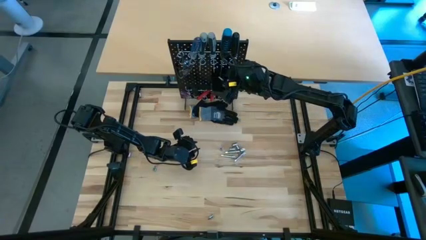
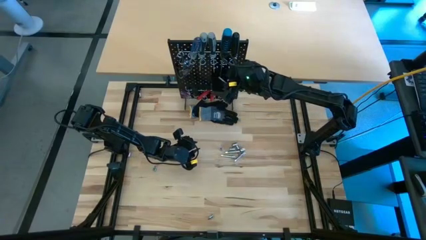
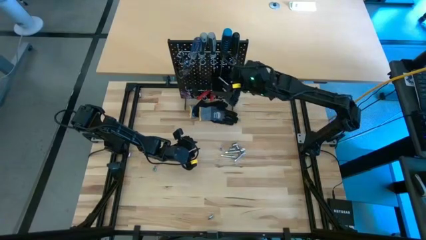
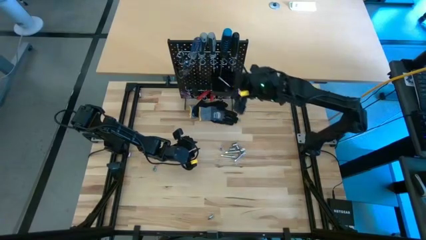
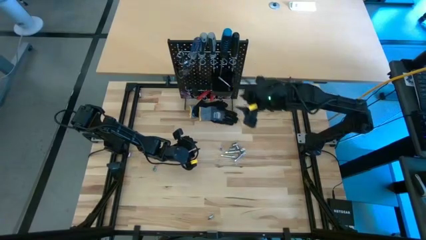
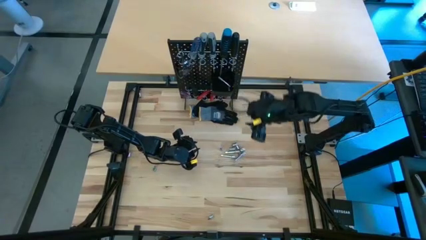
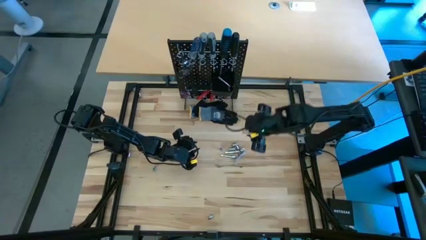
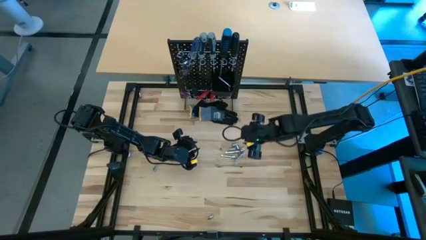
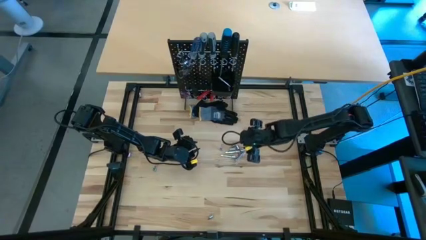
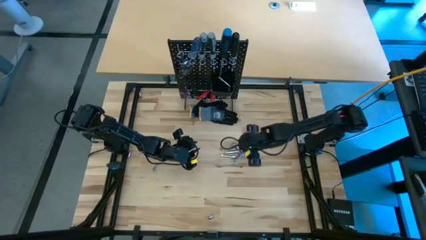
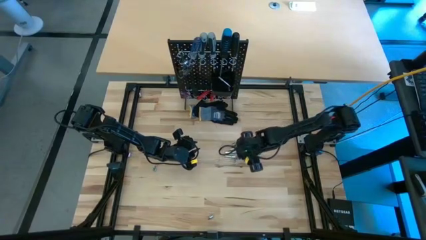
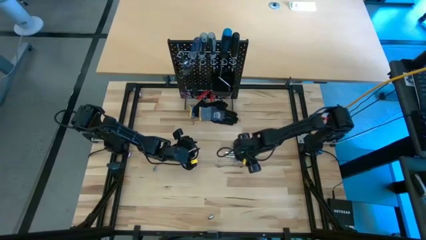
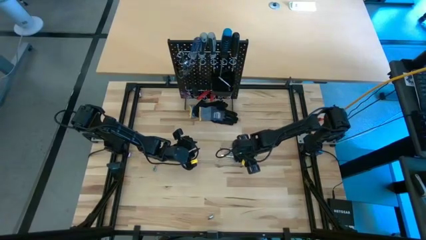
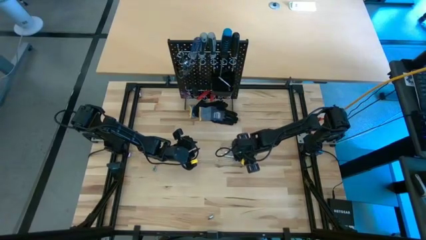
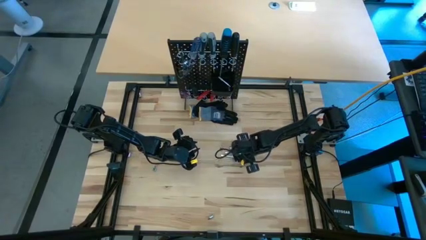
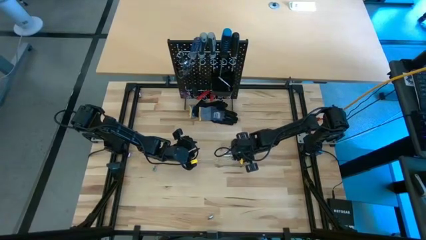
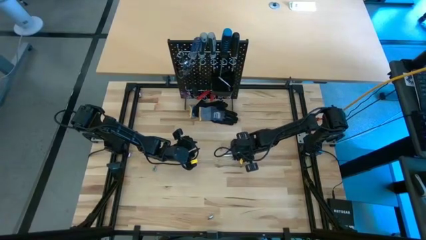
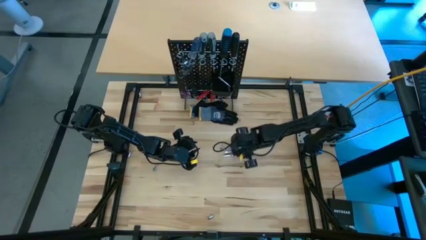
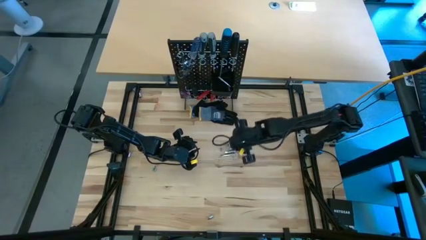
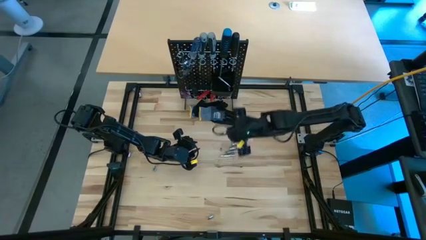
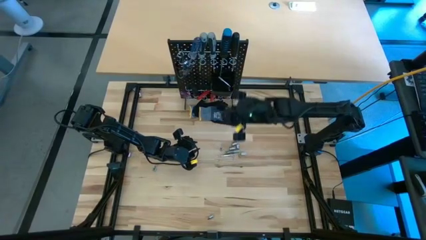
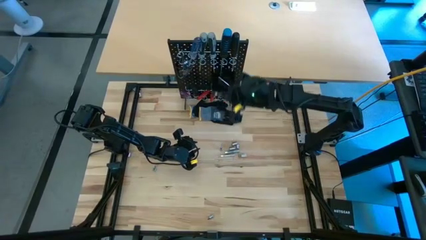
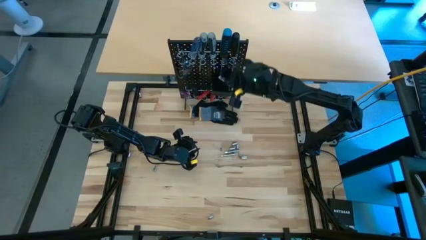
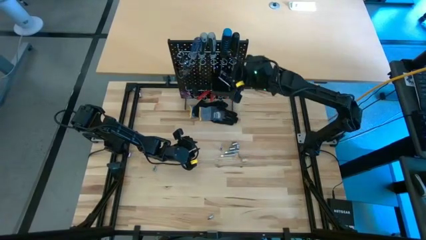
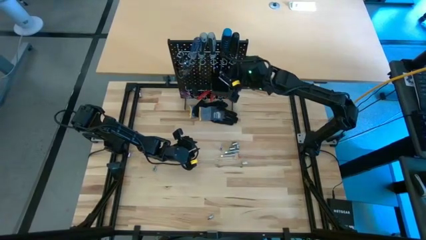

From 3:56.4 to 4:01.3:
Task: Hang tools onto peg board
Put the extension bar into the pegboard bin

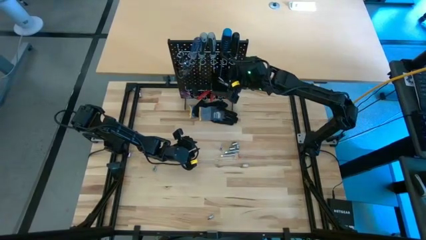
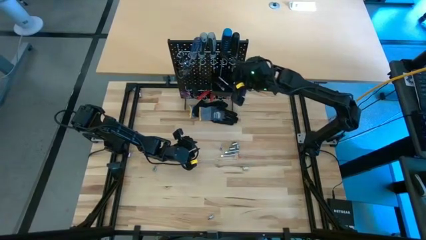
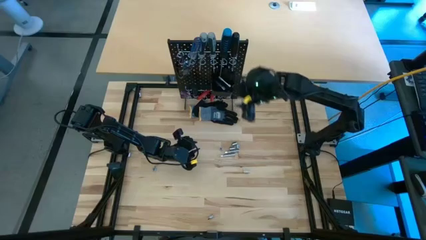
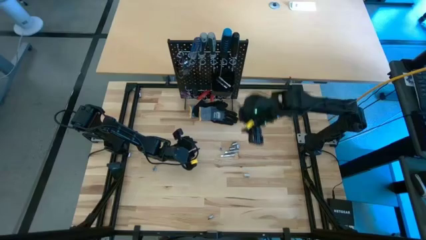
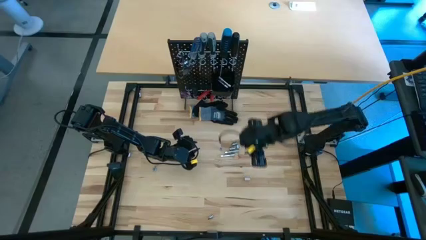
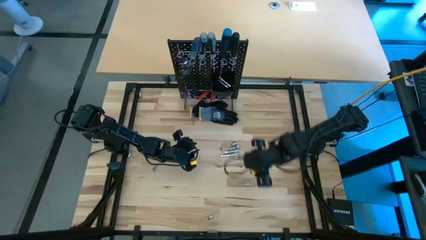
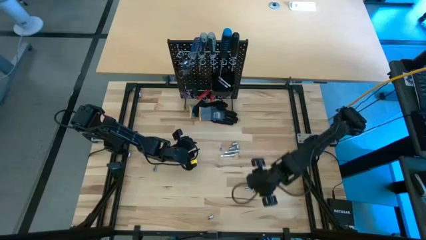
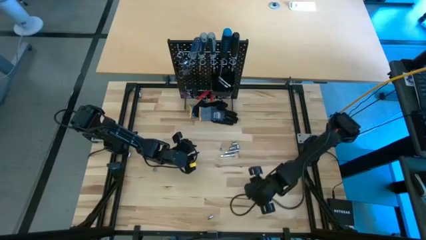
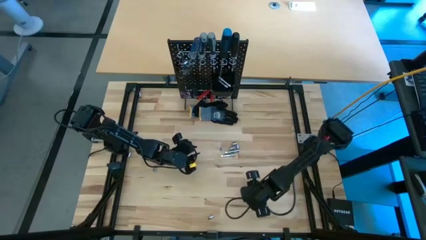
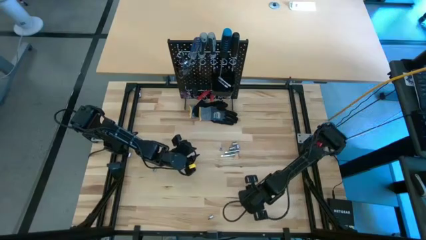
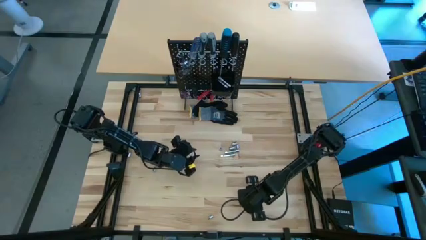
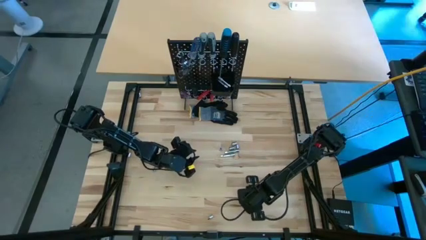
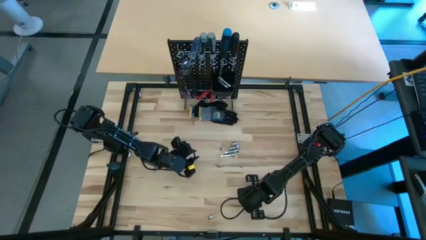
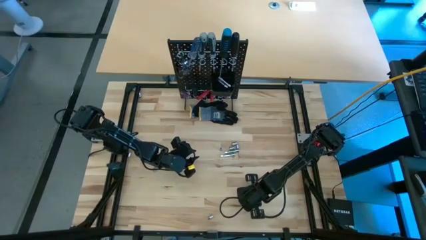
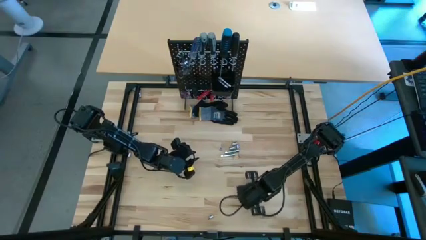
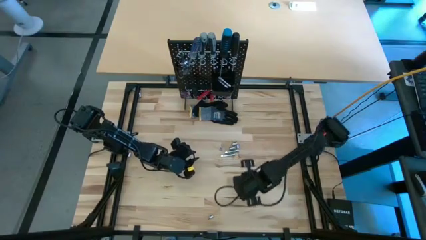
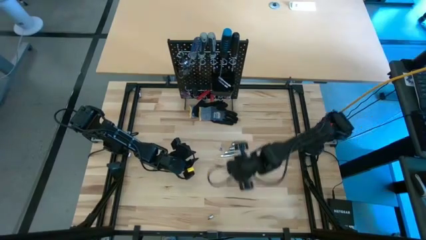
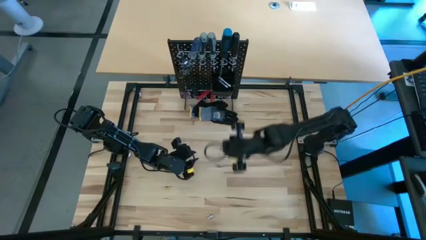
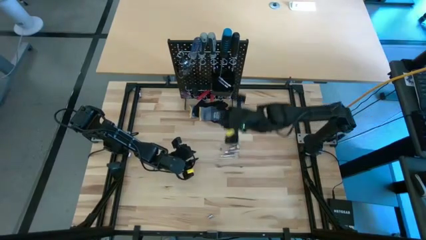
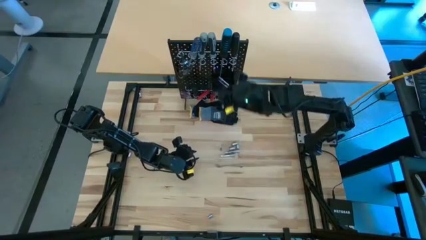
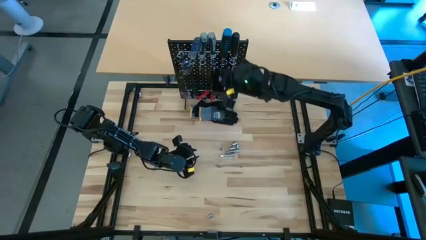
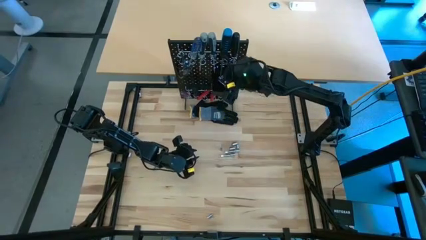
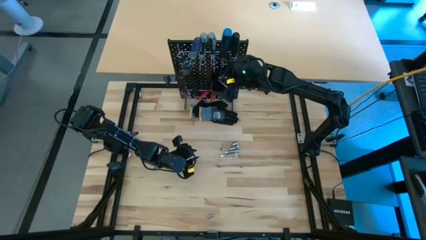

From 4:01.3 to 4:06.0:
Put the socket into the pegboard bin

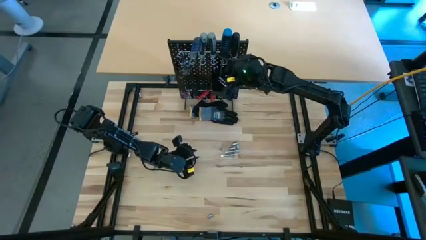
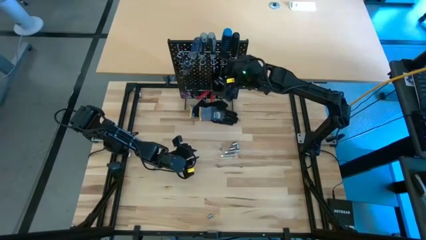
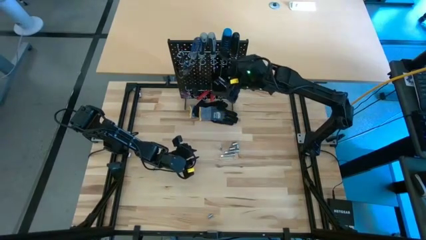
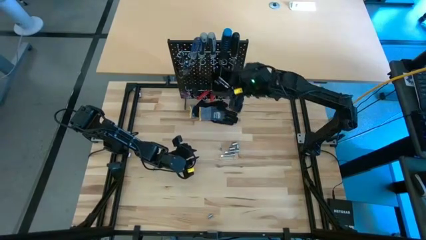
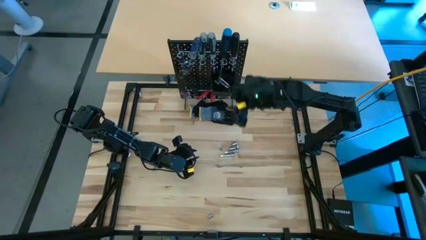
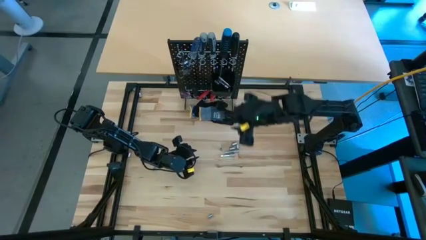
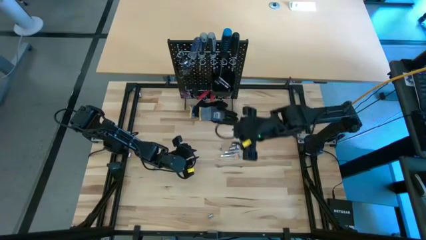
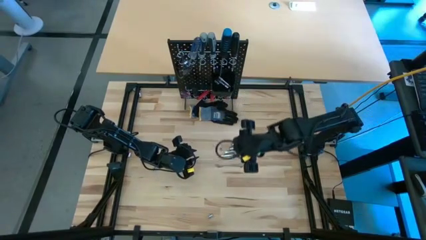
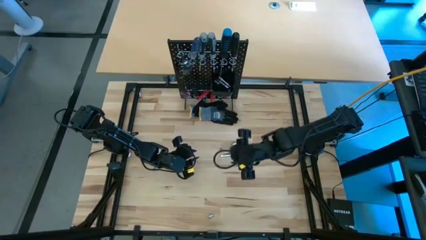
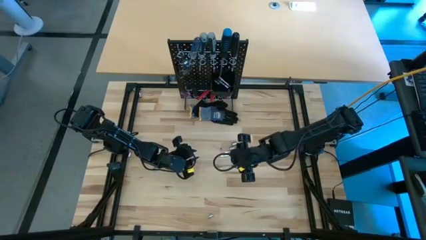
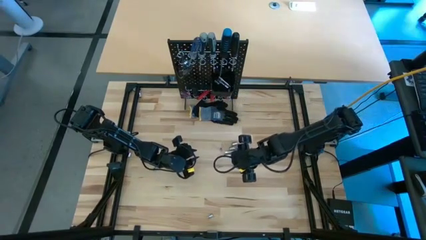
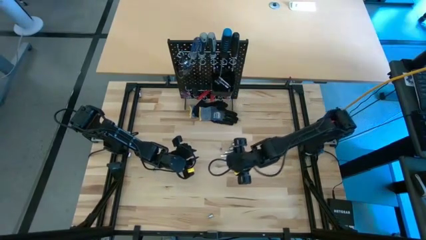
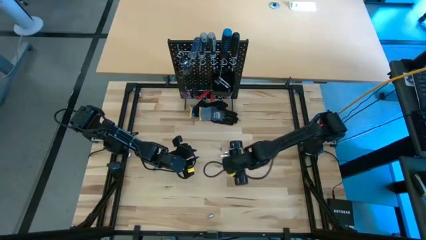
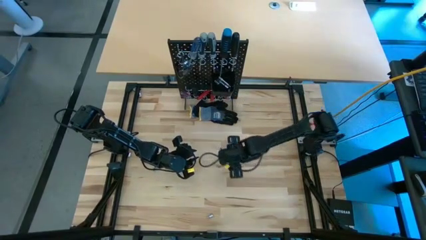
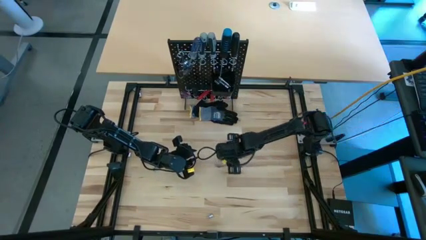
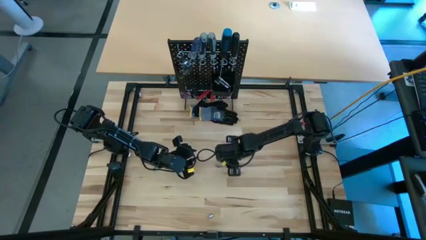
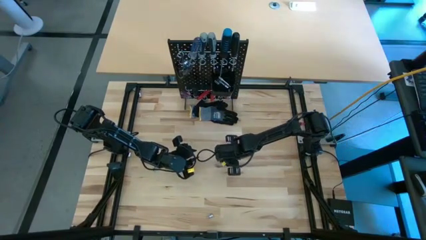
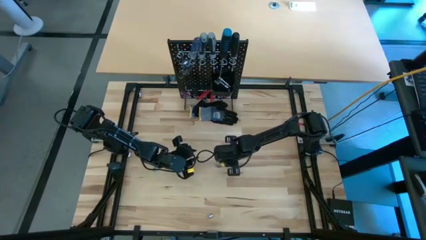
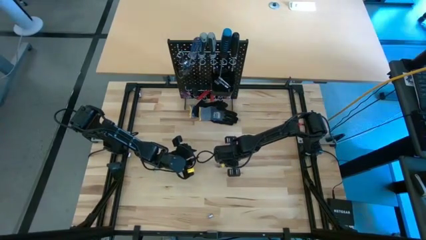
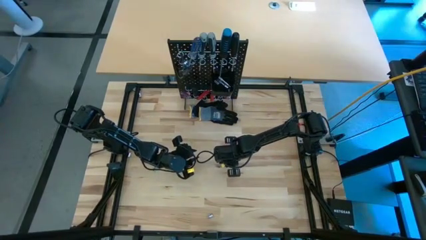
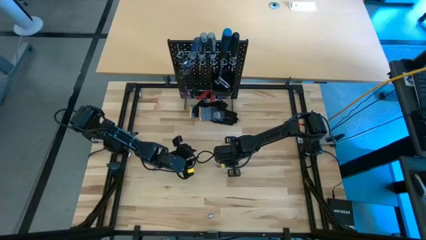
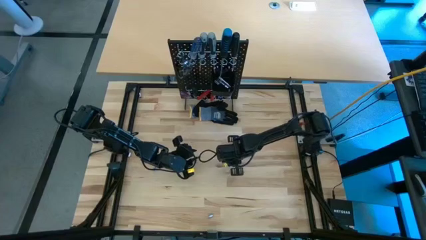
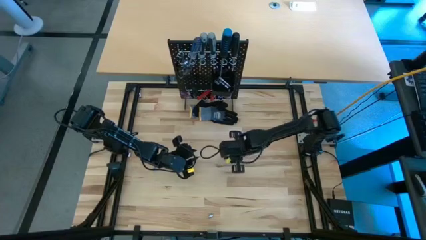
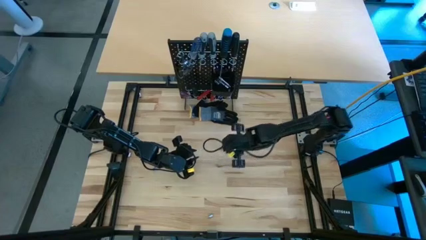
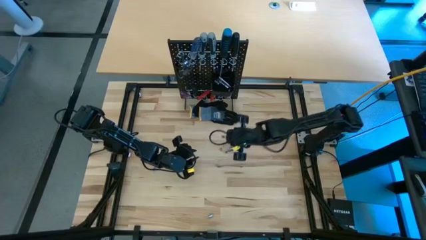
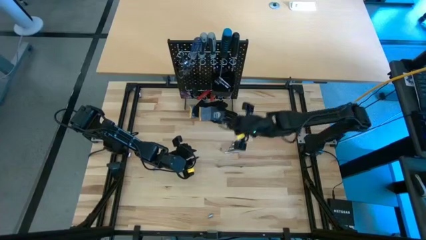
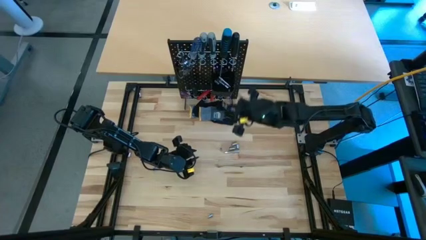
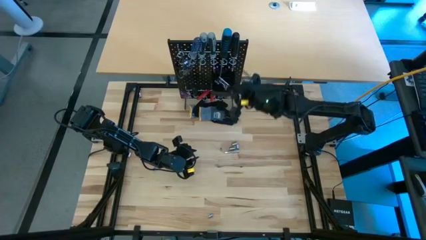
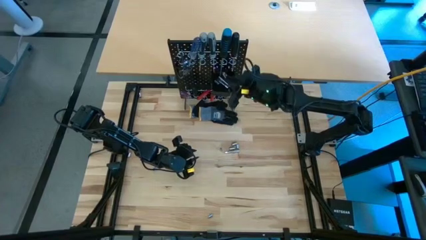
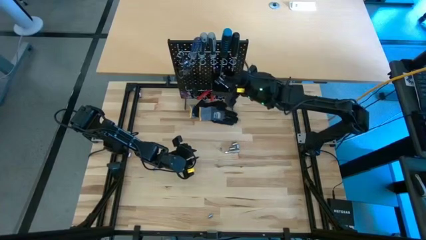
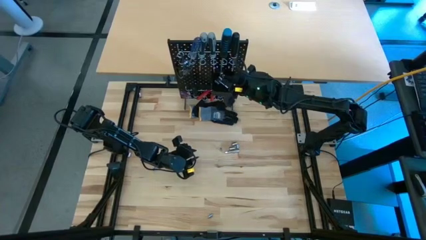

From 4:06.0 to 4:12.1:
Put the extension bar into the pegboard bin

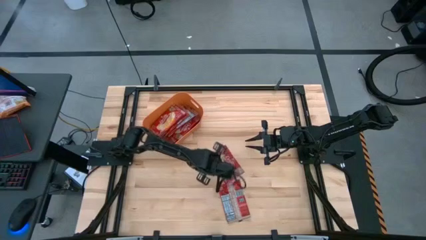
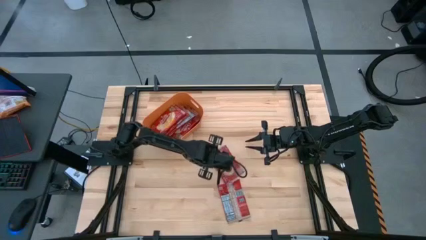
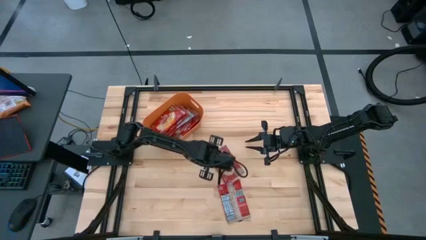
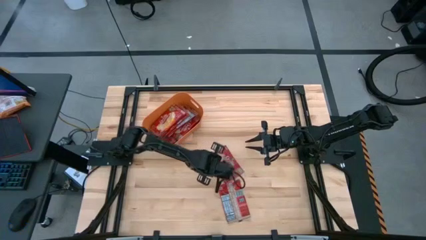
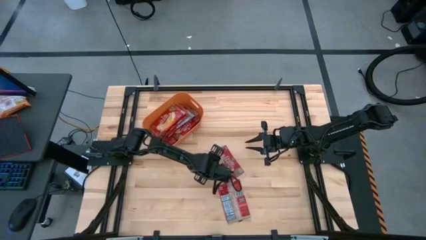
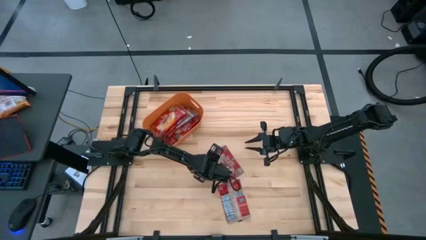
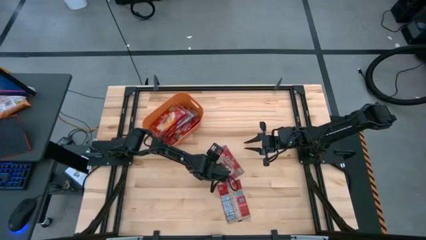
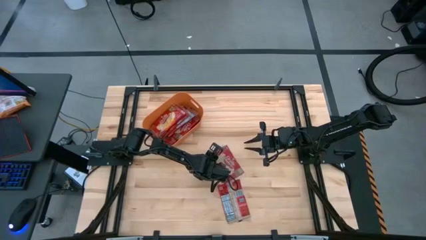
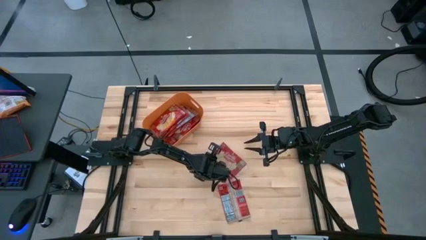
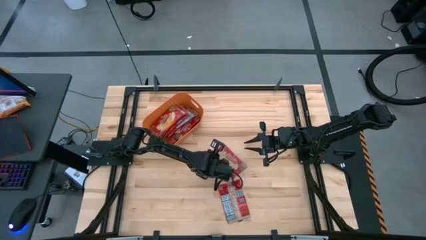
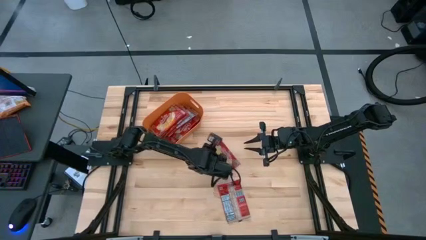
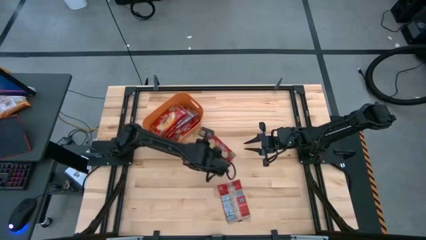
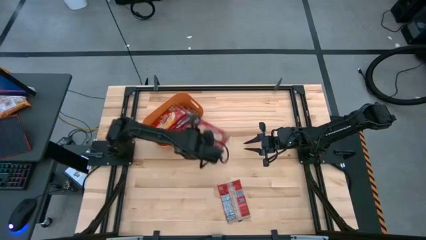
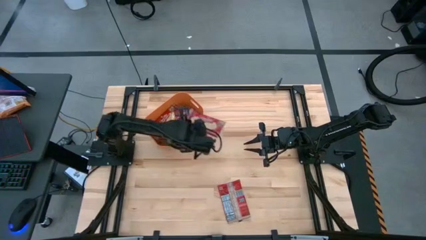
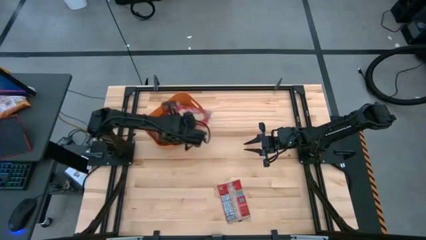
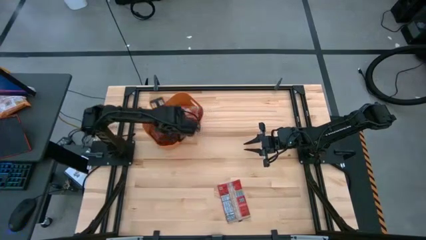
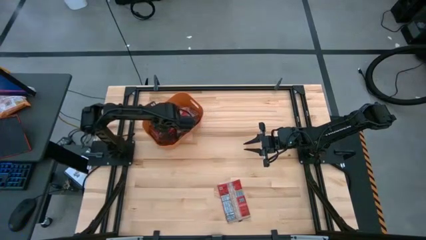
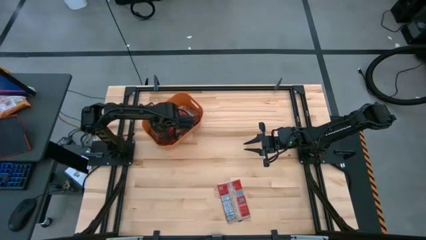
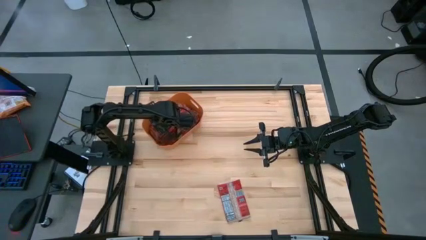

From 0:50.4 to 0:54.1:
Task: Sort popcorn bags into baskets
Put the red popcorn bag into the orange bin
